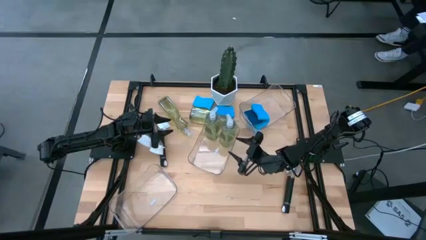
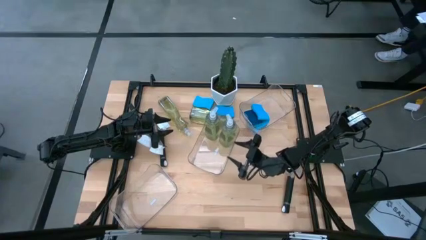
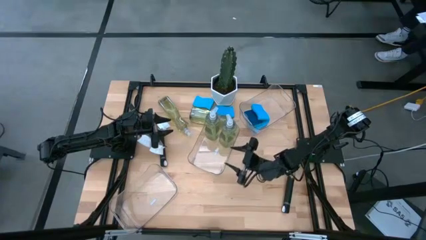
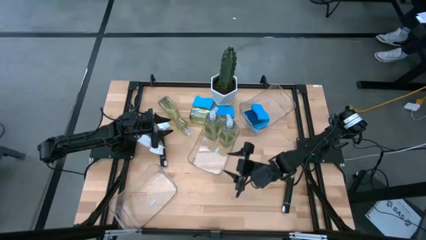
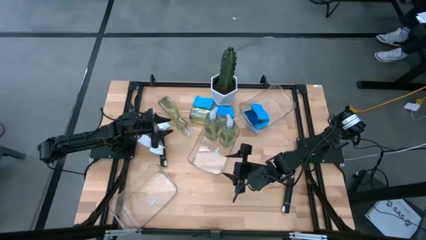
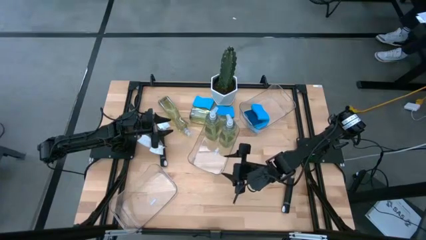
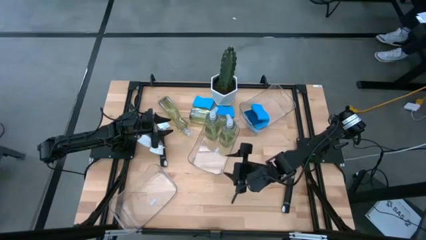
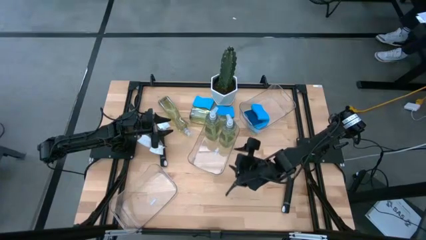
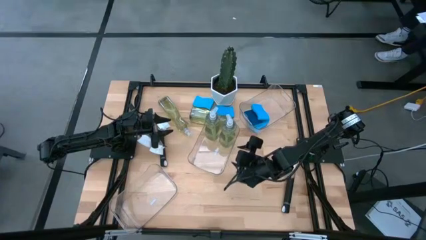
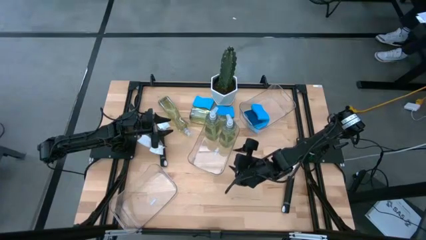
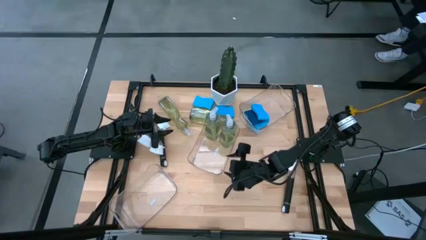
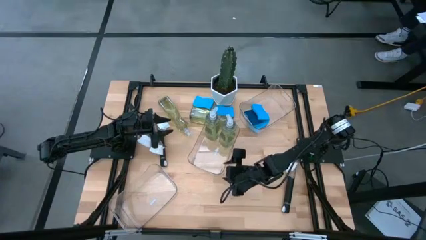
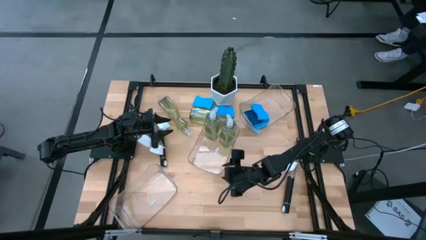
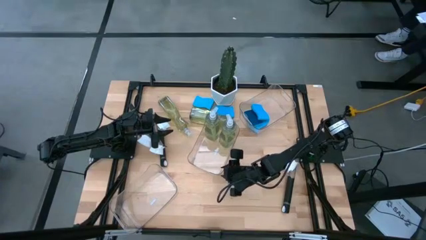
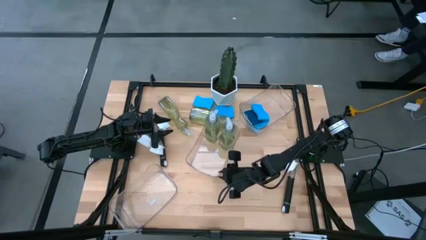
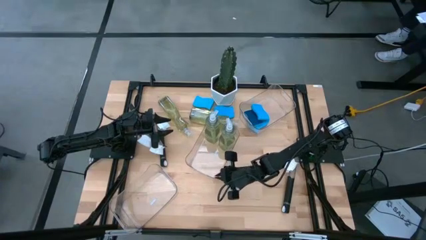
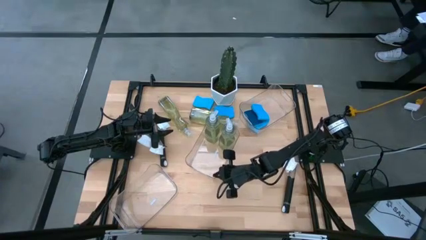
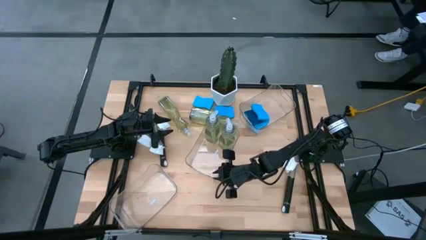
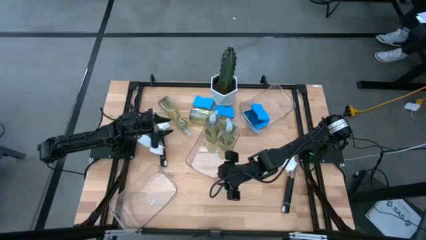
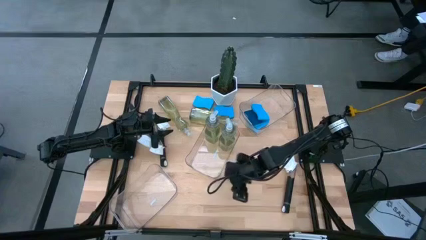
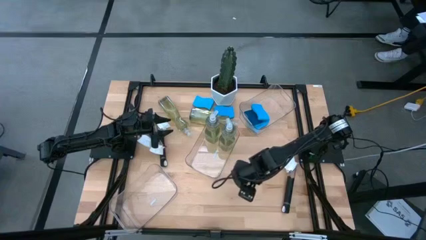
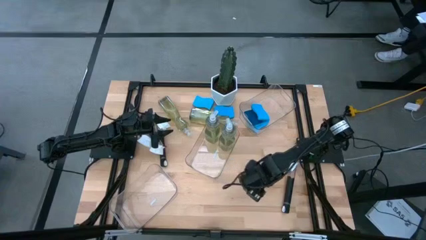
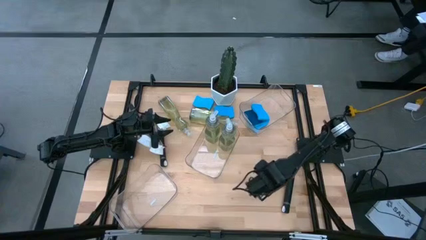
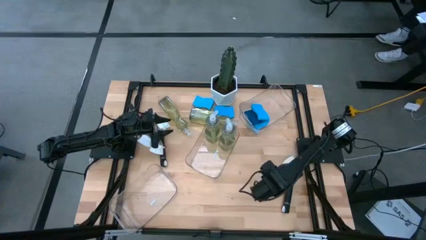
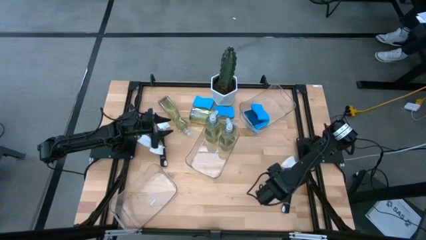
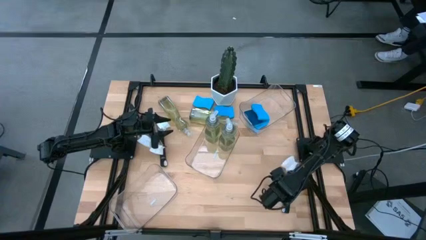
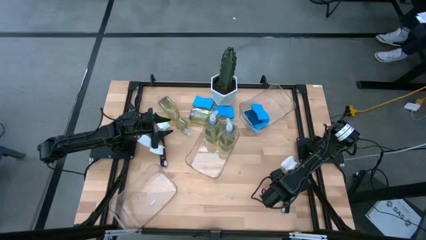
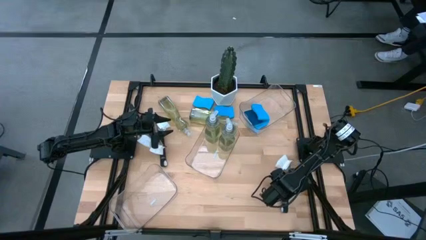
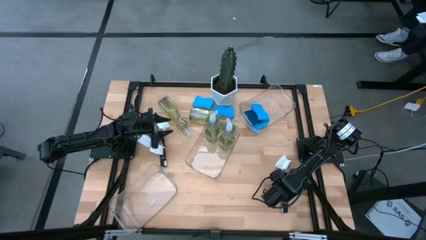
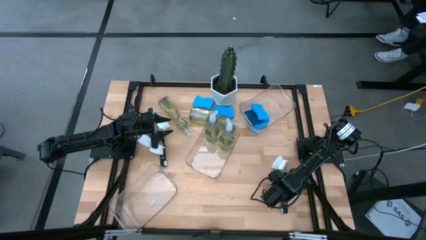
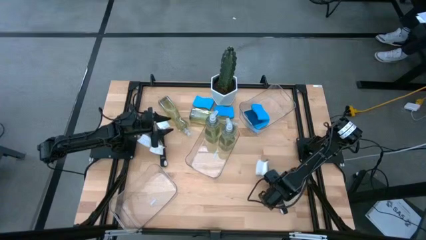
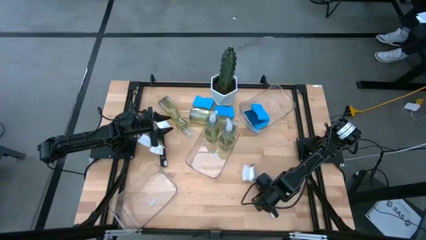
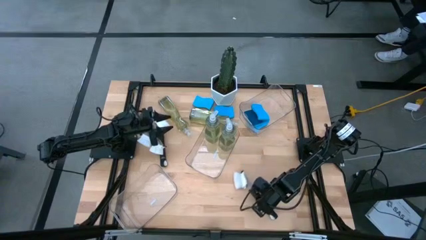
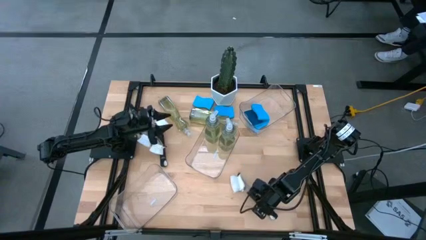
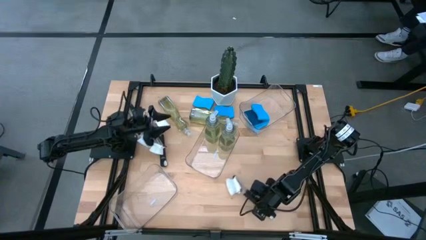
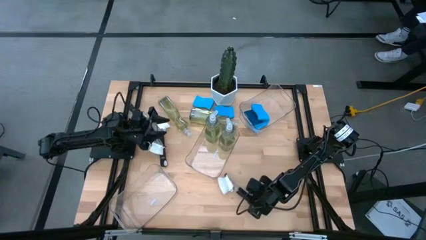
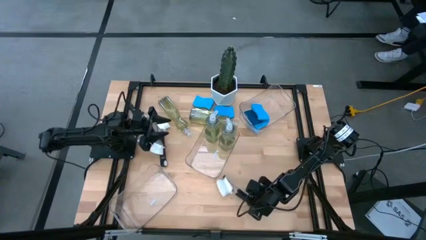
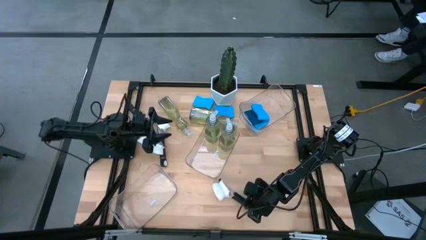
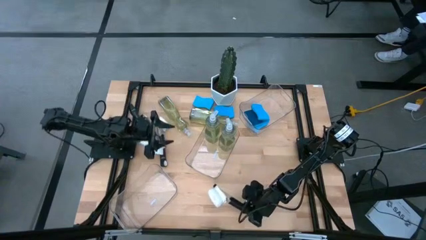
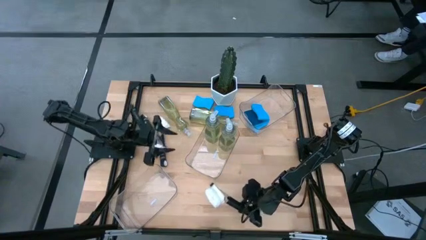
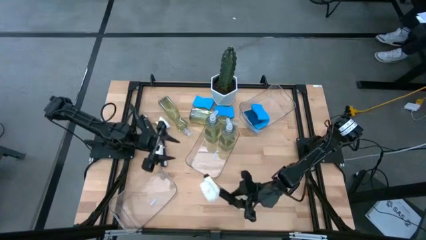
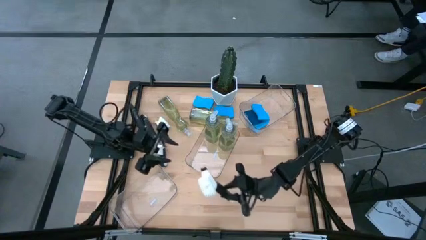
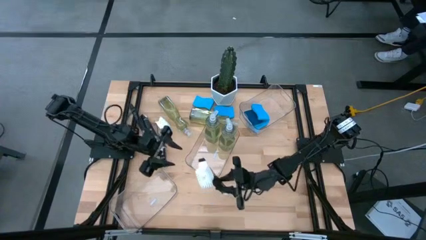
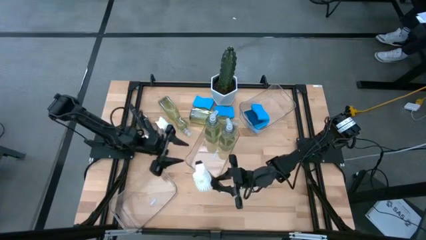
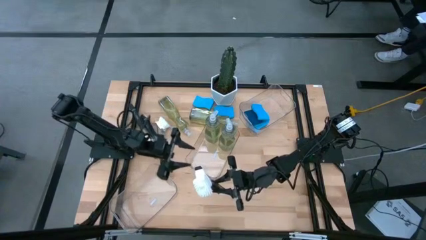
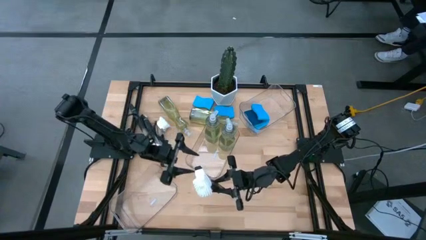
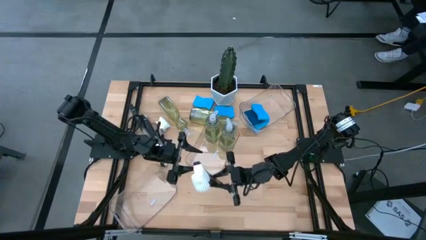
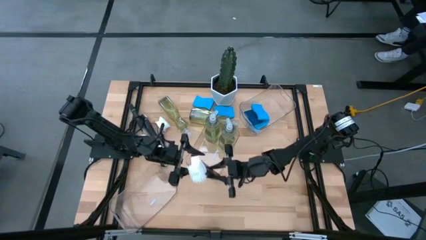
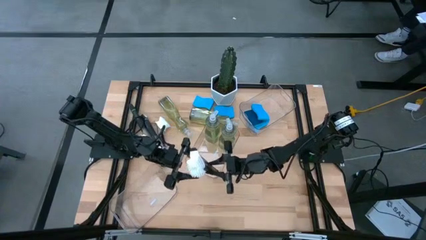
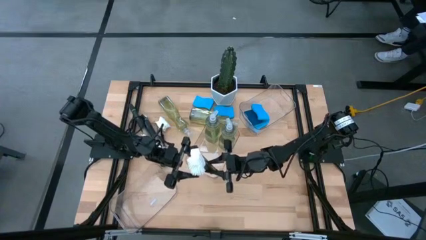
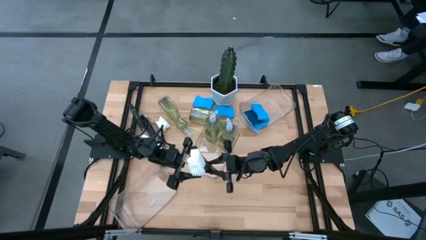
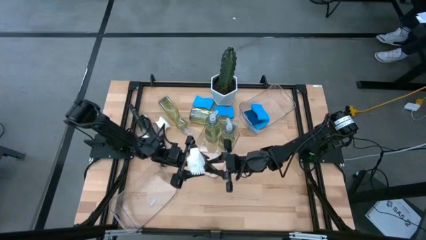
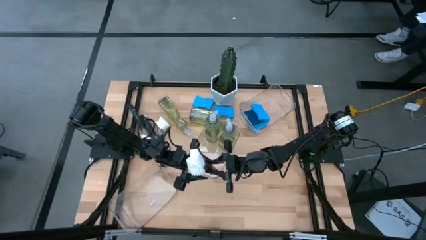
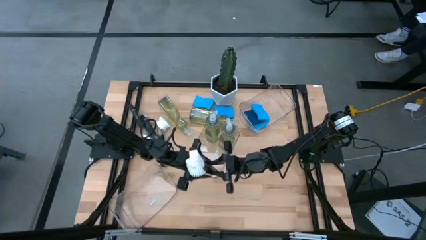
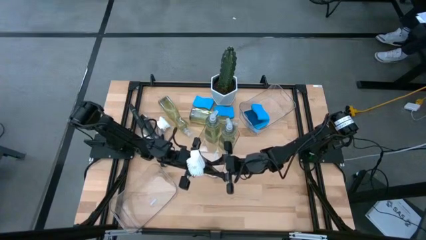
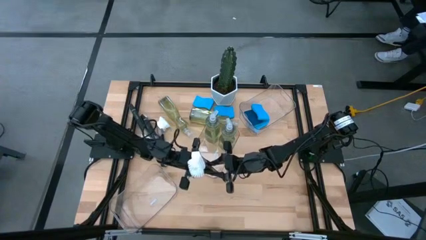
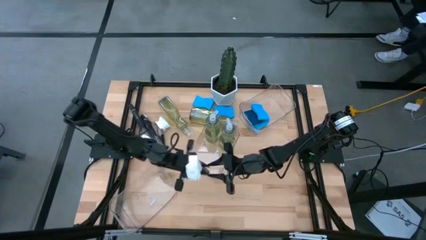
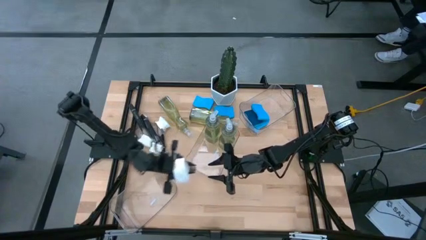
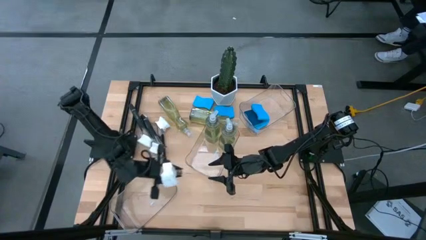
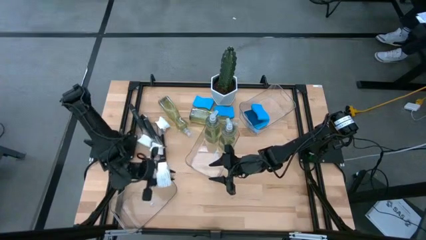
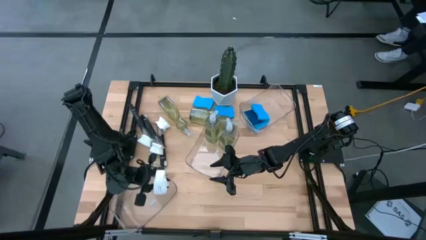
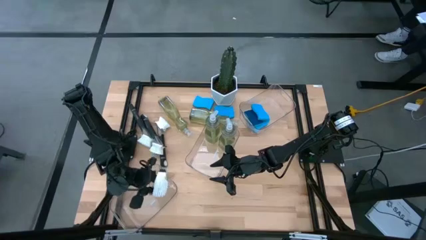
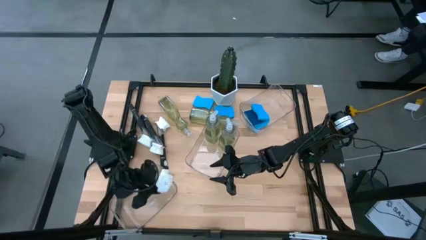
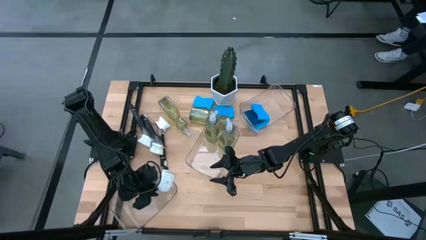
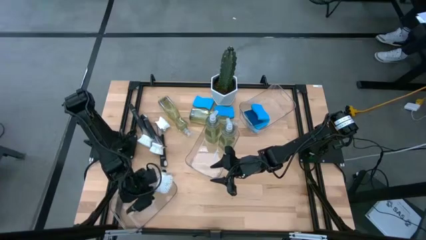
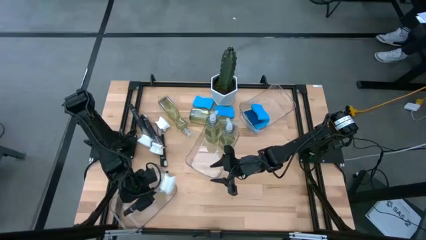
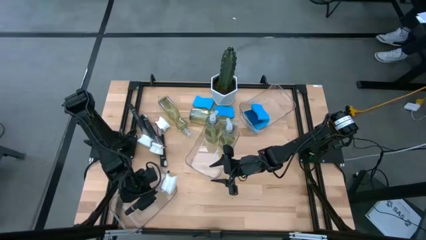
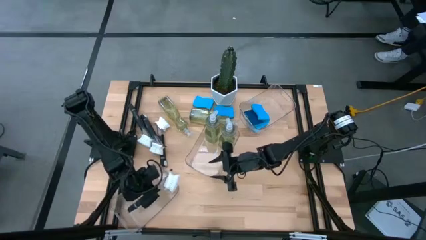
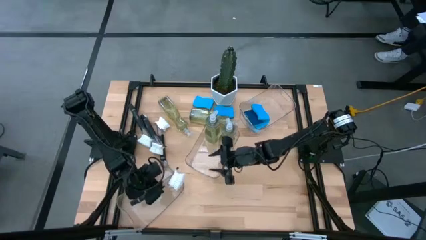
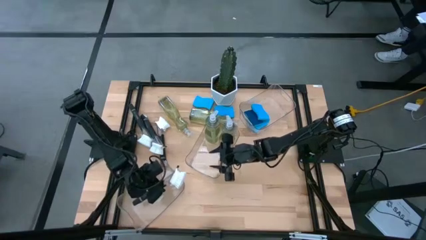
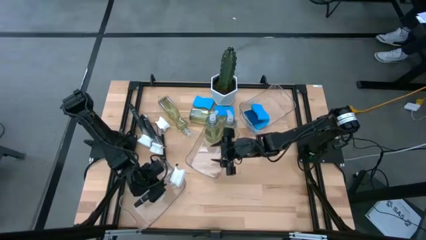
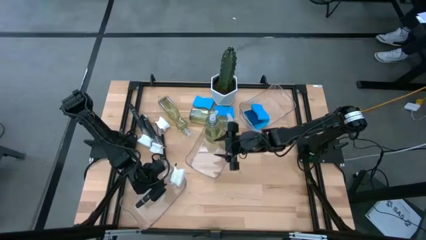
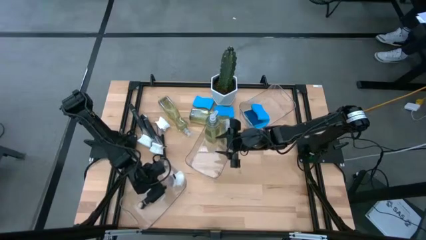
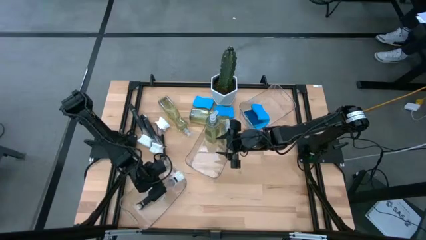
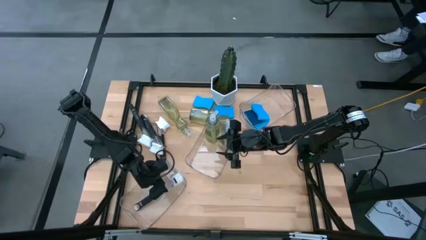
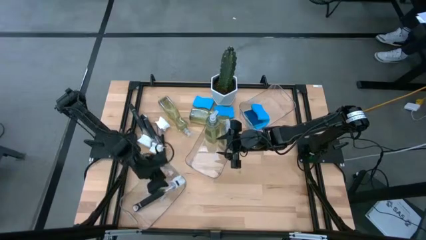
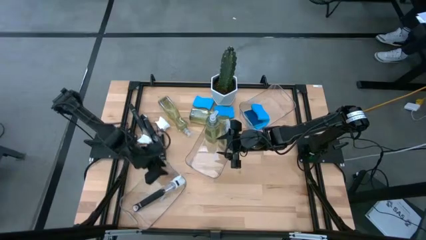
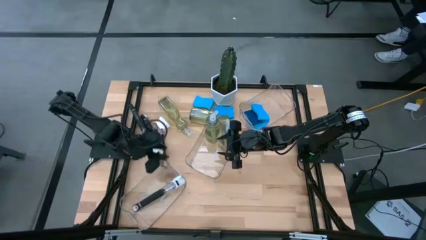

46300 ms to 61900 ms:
Task: Pick & Place Kitchen Sink Supplies
Put the black dish brush into the bottom transparent bin

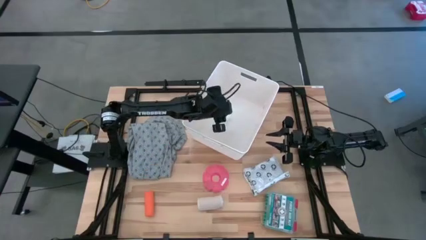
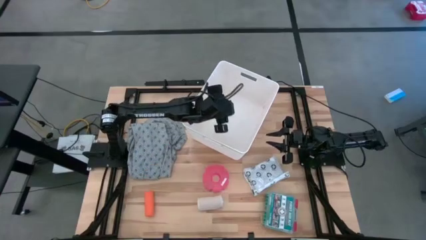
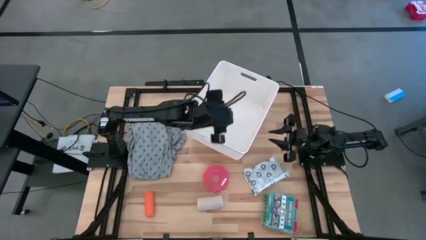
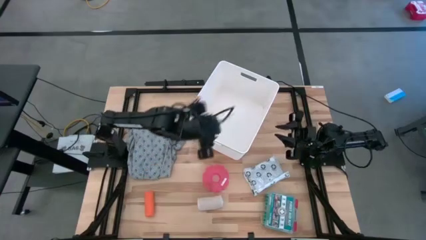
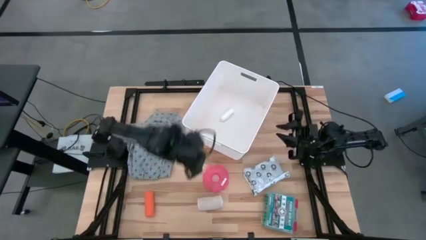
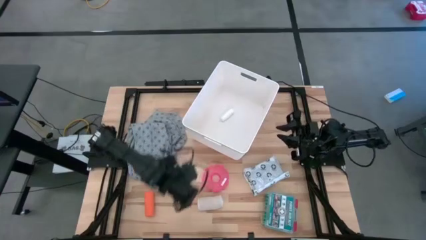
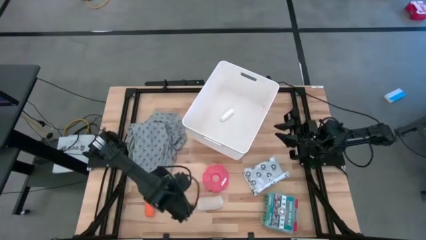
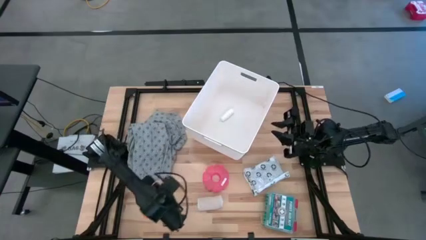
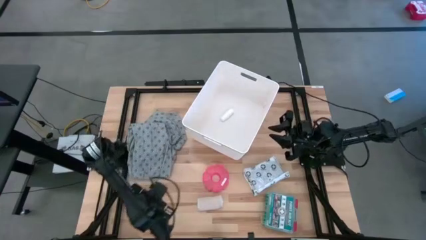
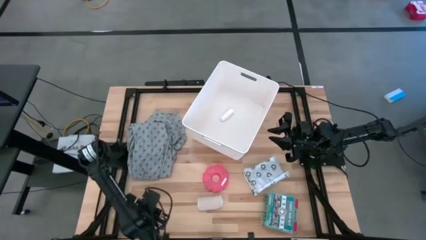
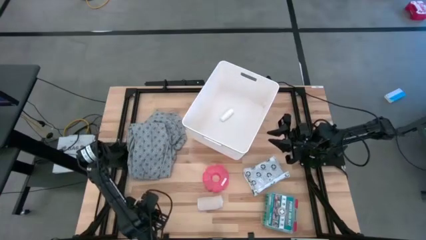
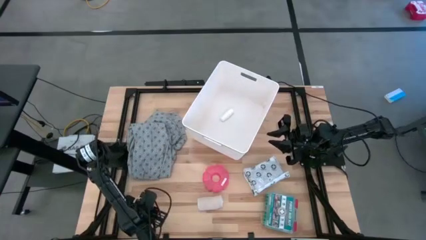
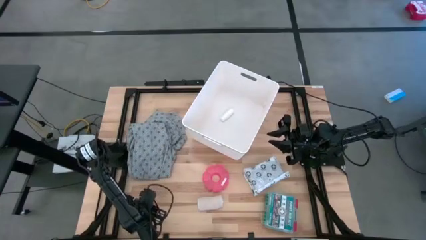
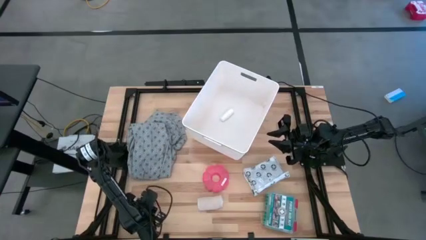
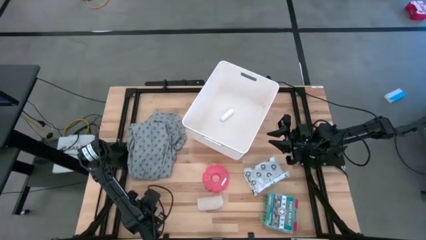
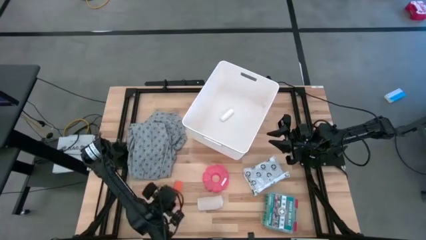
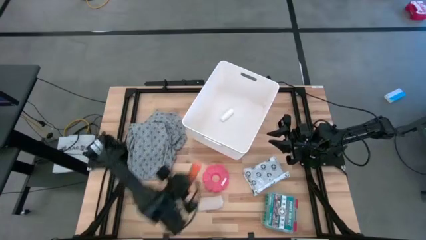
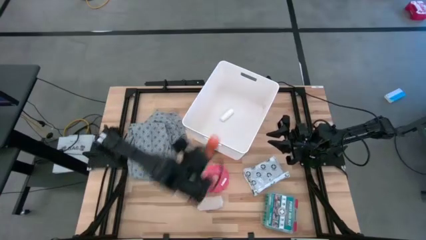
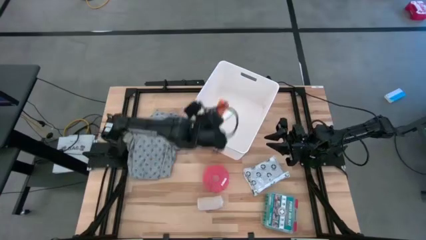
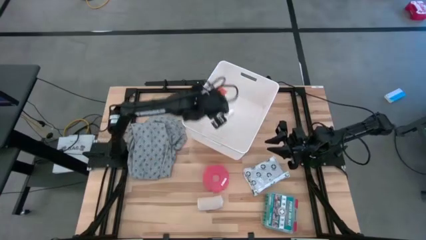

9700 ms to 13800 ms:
Task: Pick & place medical supplies in basket/bin
Put the orange bandage into the white bin
